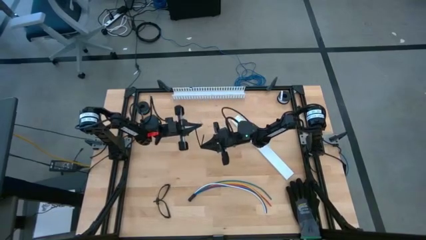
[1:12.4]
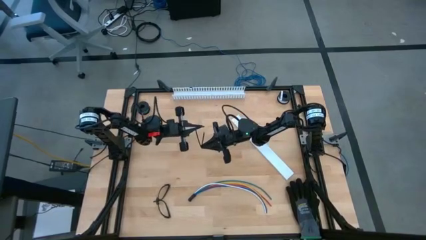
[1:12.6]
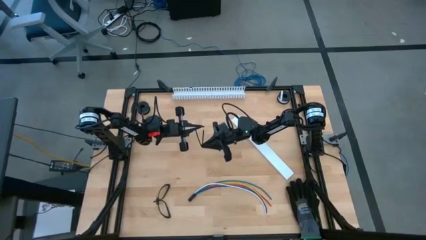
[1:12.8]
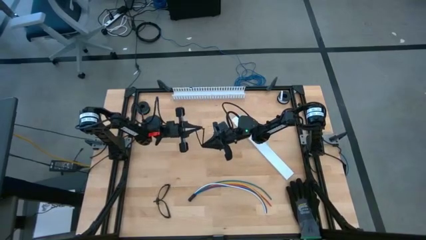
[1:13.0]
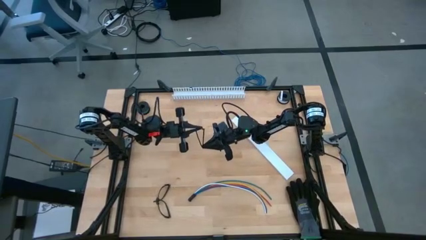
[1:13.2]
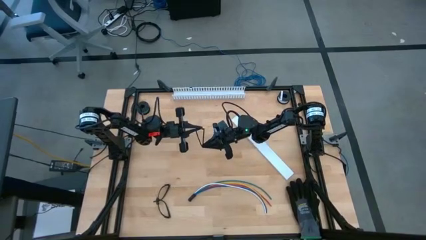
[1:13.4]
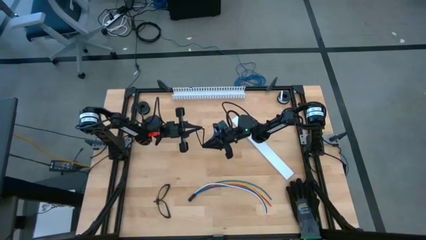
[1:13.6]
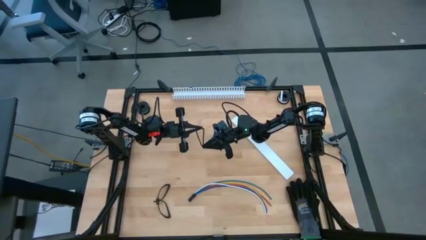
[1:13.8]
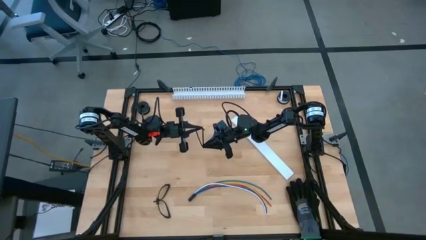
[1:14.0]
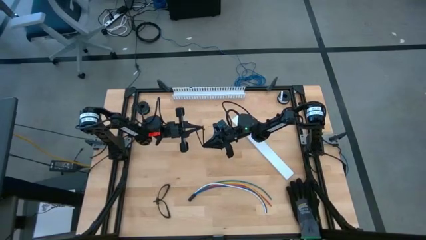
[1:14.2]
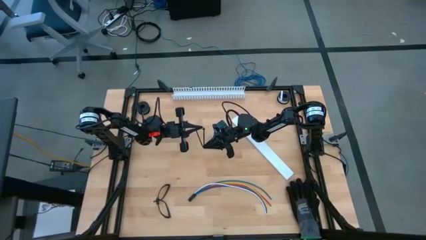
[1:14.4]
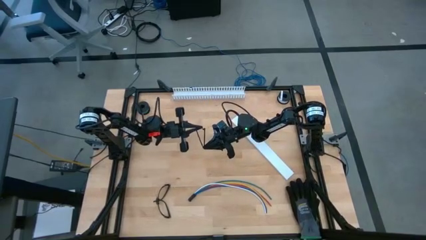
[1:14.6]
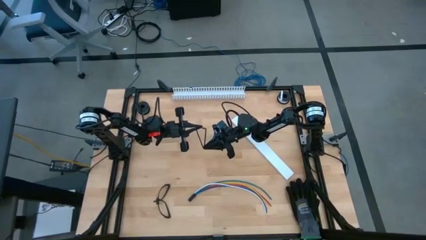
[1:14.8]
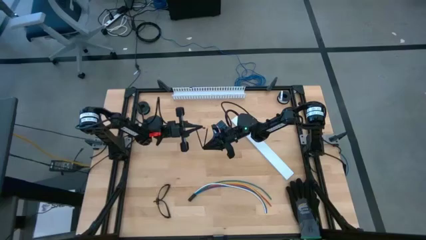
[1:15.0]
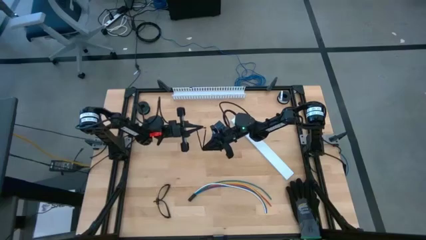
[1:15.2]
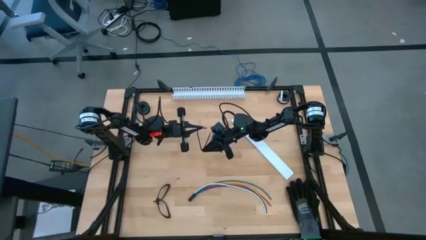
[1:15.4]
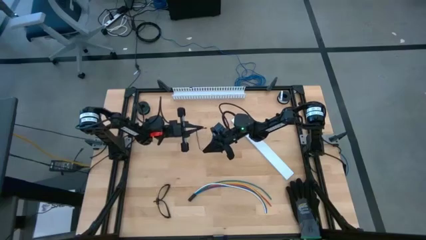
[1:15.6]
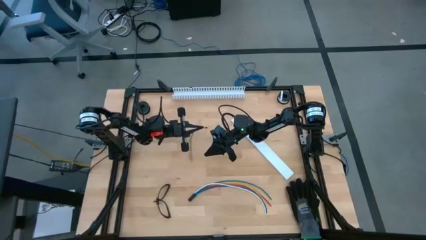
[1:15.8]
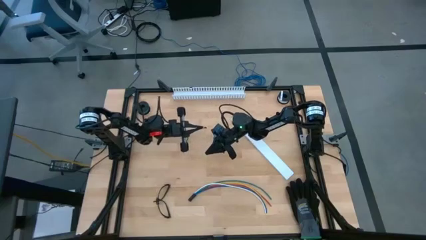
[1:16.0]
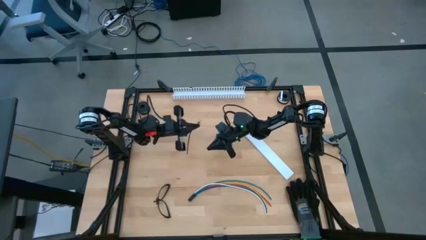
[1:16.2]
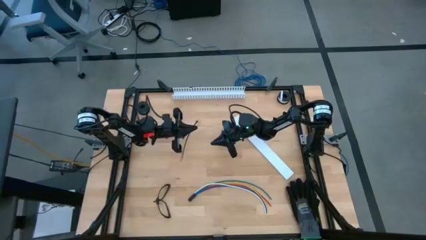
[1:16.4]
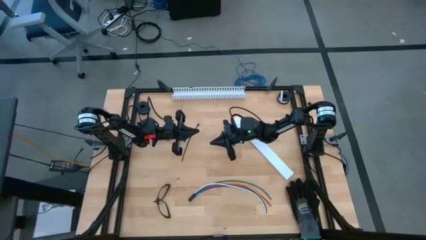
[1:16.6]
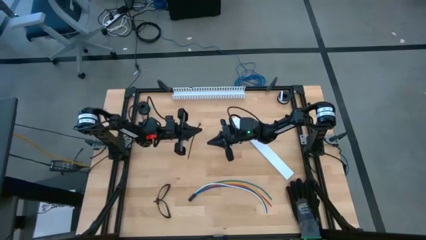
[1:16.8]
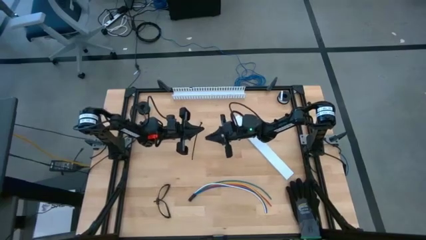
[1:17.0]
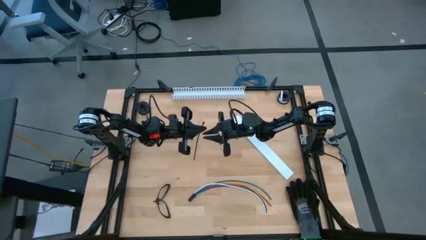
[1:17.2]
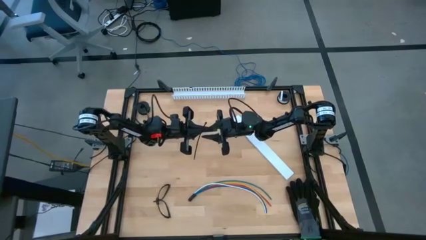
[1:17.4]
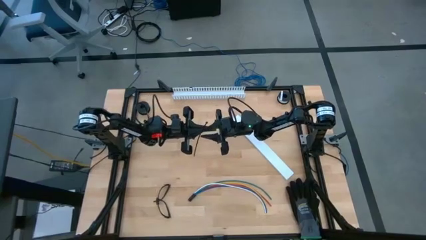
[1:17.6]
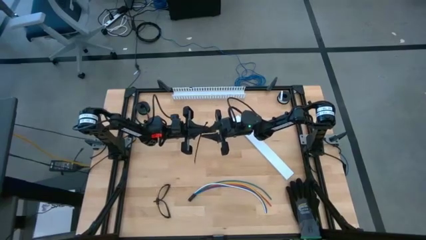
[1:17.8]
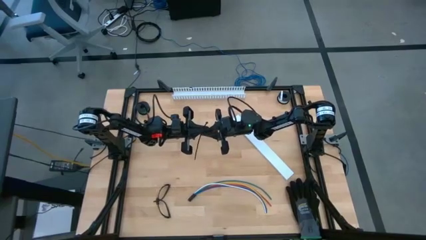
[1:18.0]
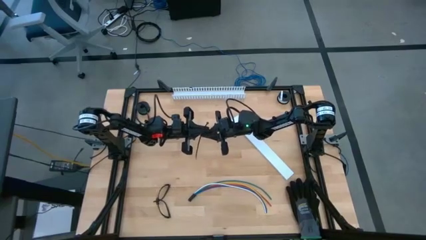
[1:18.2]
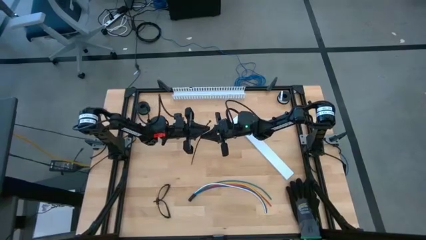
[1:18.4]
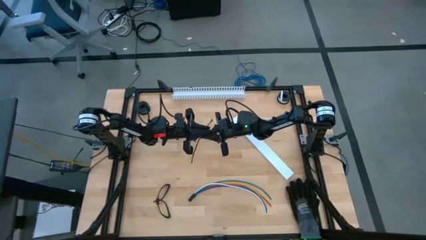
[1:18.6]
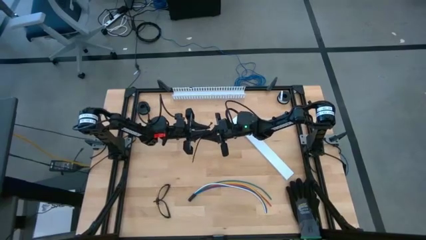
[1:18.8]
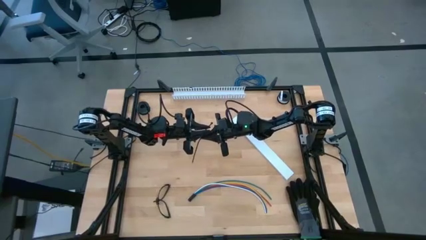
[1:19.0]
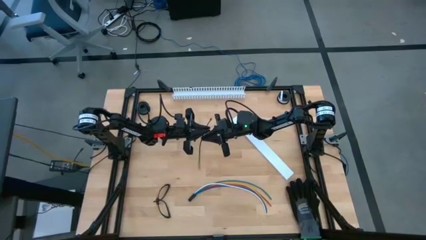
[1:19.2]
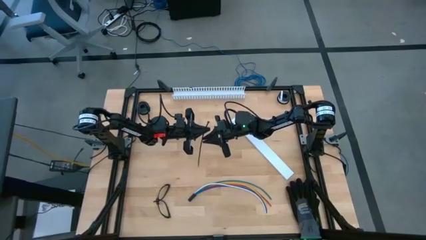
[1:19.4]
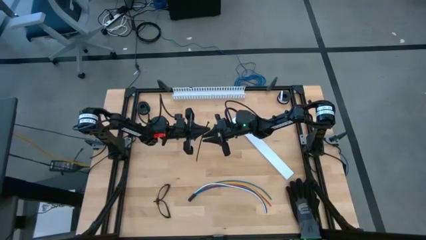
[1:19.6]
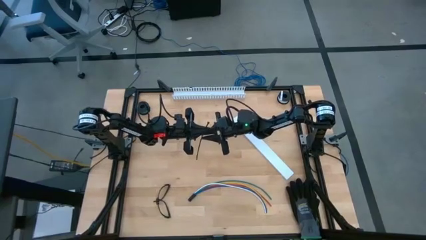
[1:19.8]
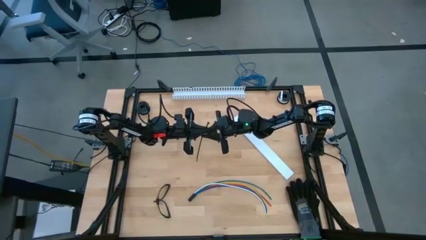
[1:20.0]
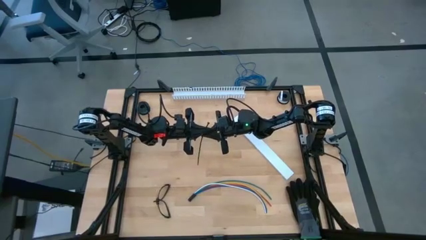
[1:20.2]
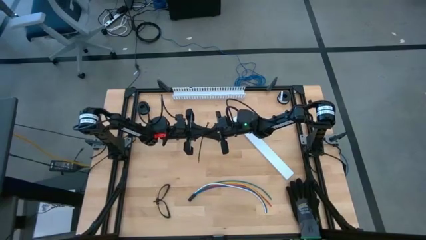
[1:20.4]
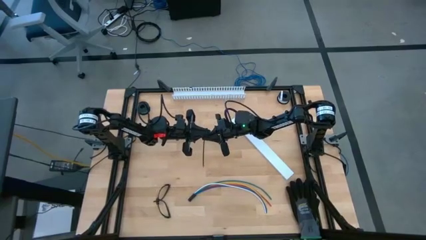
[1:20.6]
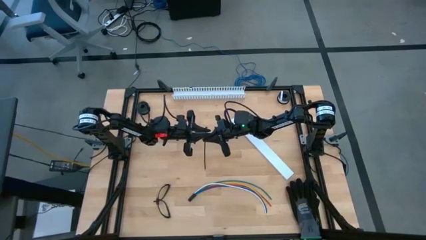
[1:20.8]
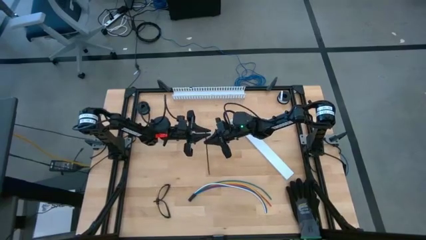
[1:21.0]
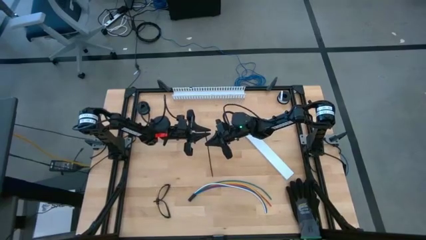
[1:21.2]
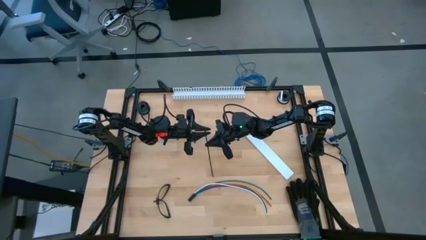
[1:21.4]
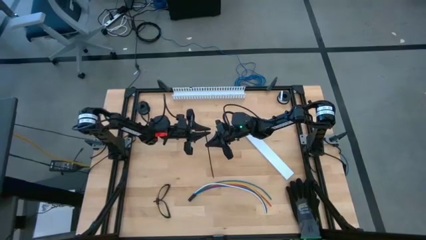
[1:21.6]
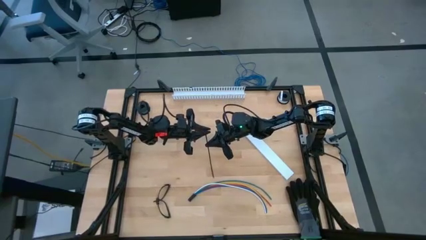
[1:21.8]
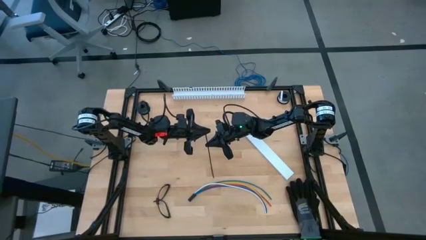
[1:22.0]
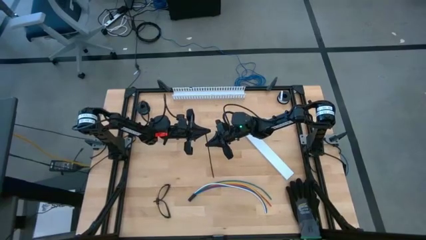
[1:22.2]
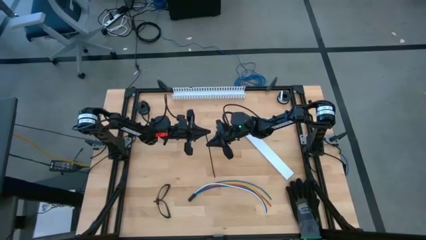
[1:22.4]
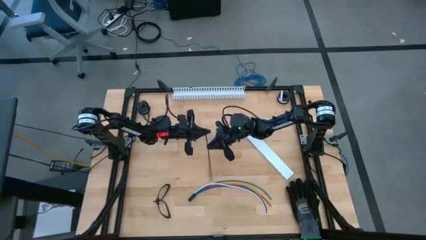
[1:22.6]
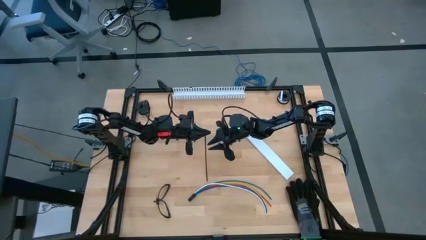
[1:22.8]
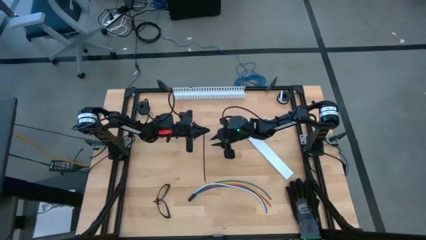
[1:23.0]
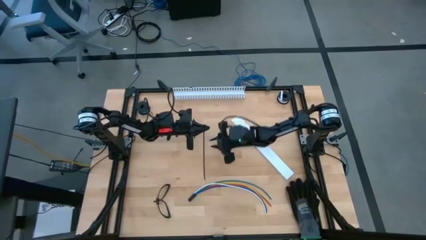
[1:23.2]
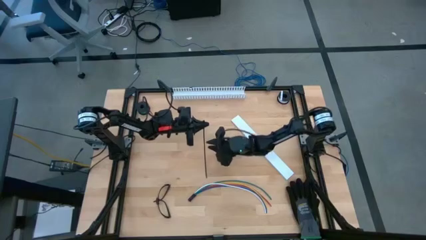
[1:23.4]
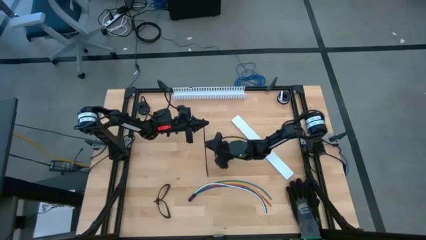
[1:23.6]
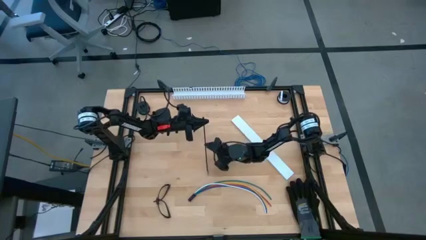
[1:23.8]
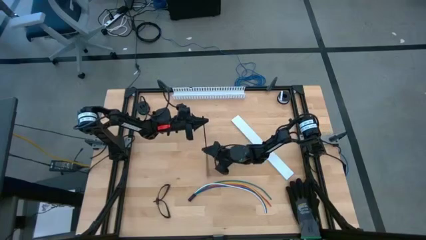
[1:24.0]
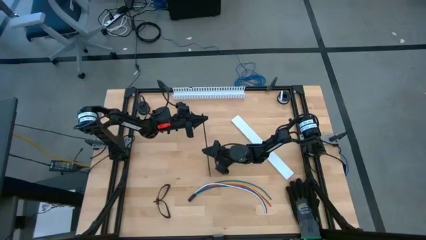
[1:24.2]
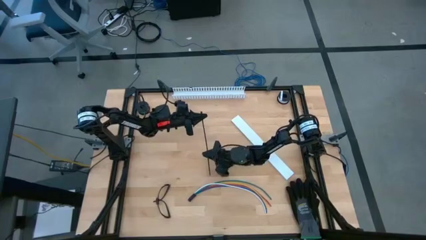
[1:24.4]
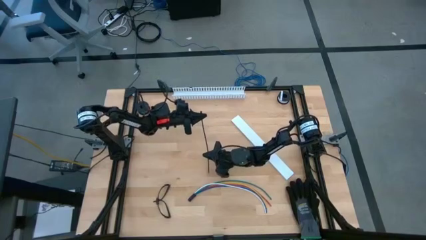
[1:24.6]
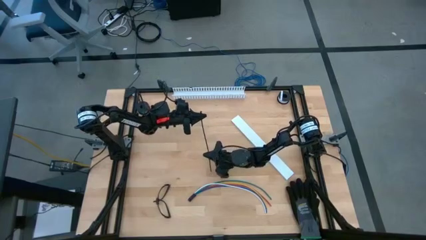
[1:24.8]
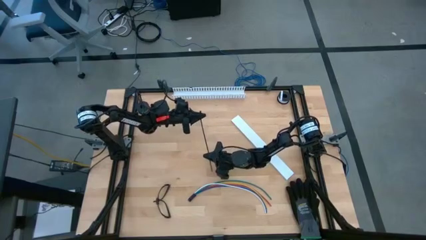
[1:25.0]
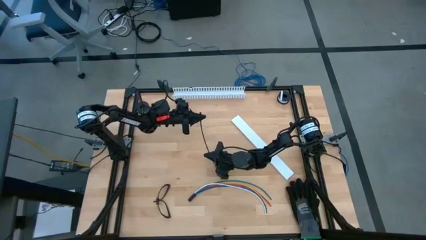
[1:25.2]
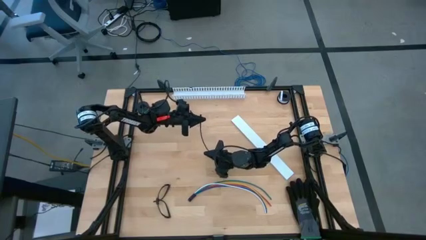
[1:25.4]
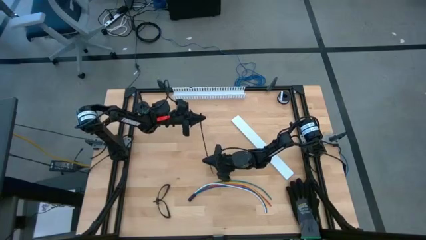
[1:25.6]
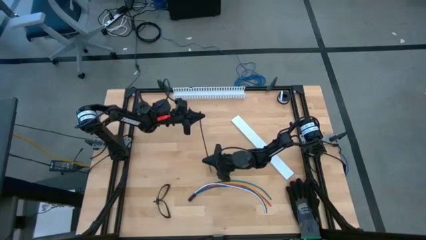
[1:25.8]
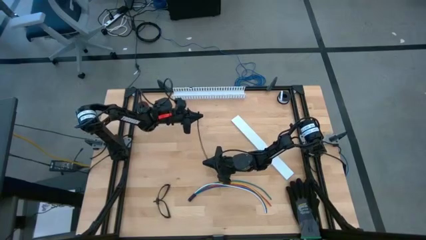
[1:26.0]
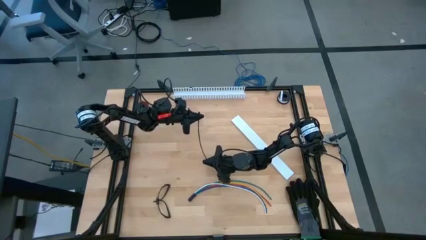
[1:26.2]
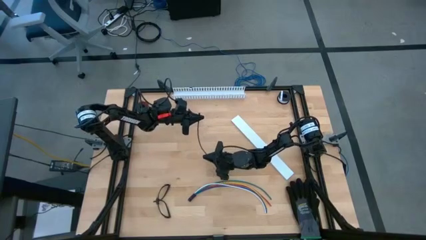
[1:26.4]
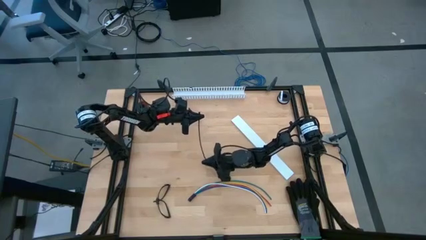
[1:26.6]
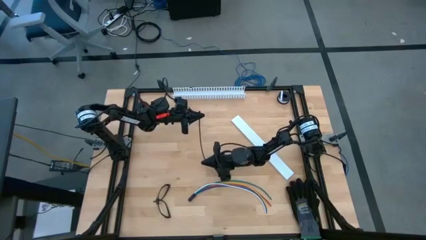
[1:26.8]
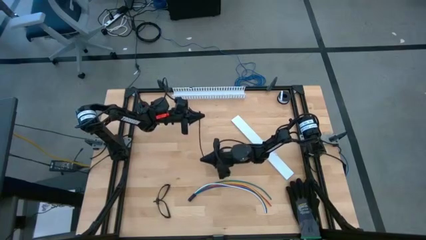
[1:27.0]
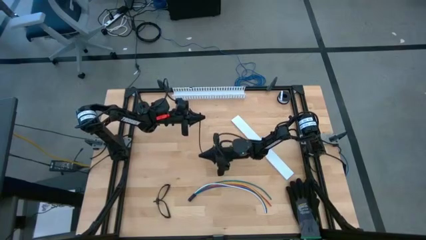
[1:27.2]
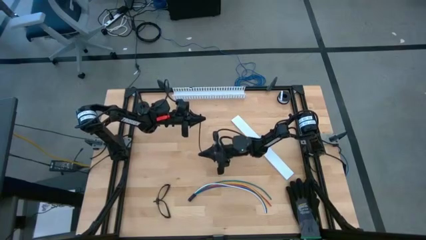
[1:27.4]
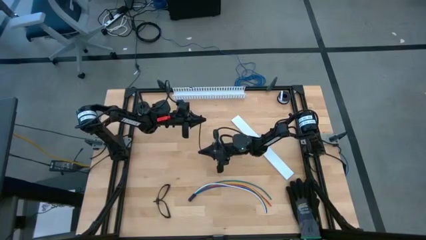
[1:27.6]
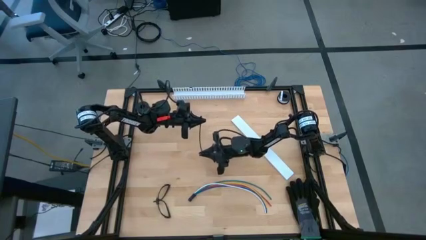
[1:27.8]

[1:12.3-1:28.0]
Task: Ziptie cables
Wrap the zip tie around the cable wires
